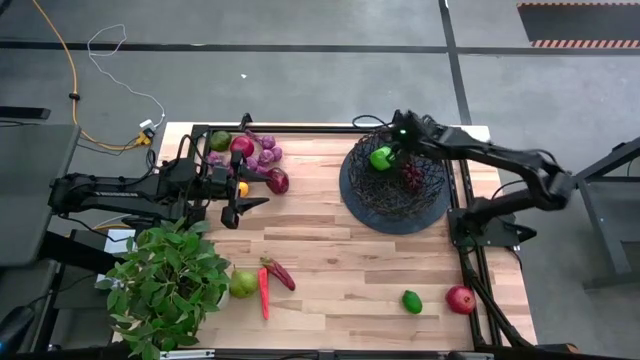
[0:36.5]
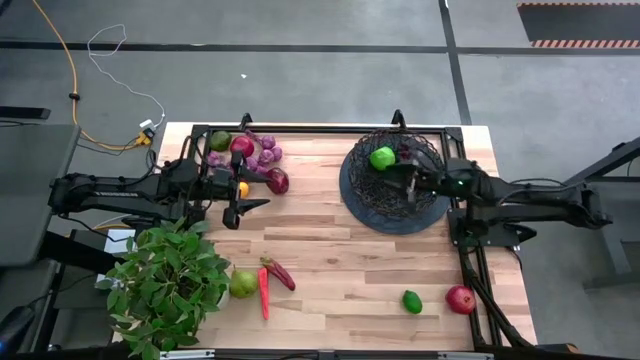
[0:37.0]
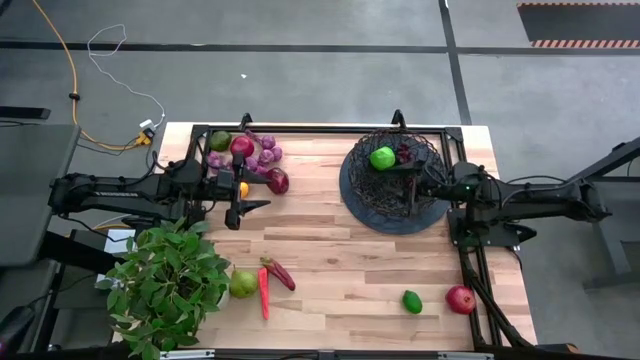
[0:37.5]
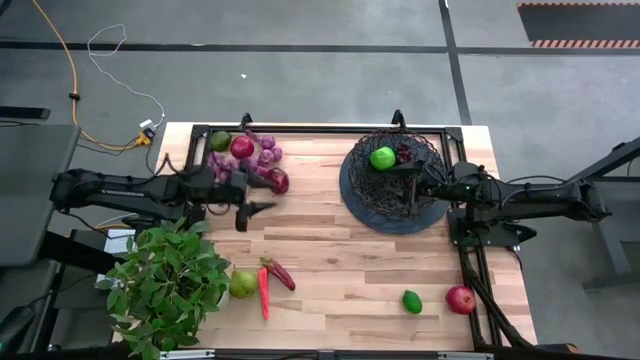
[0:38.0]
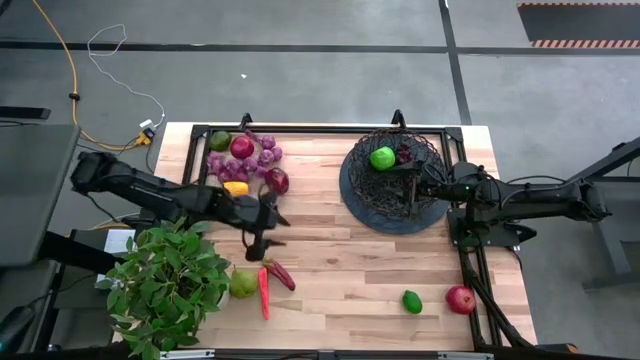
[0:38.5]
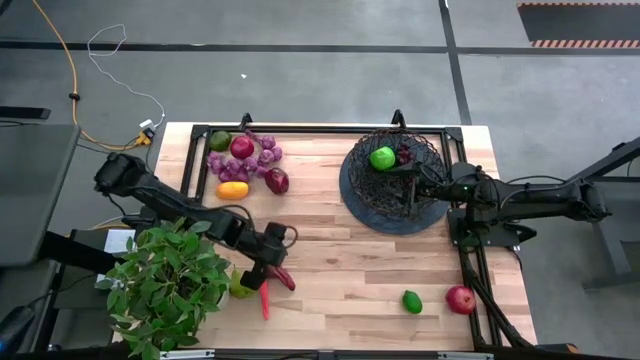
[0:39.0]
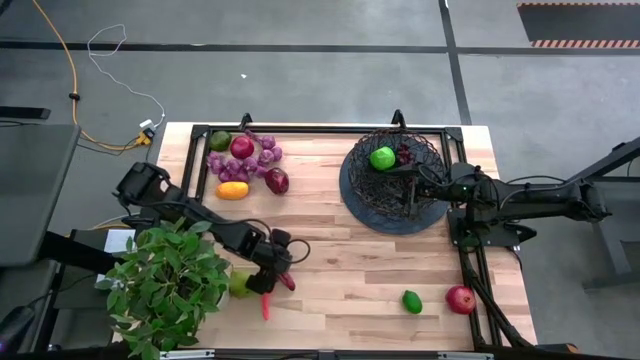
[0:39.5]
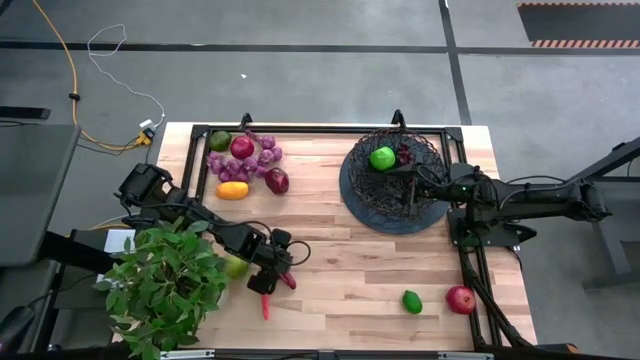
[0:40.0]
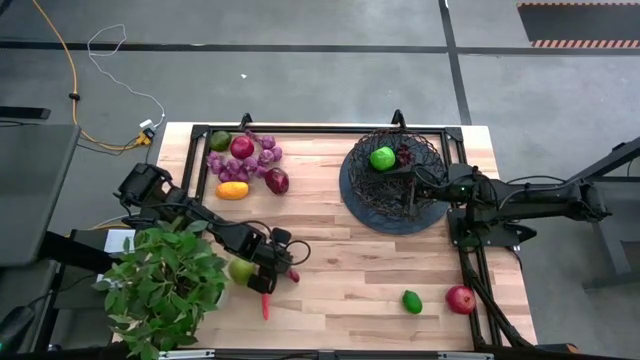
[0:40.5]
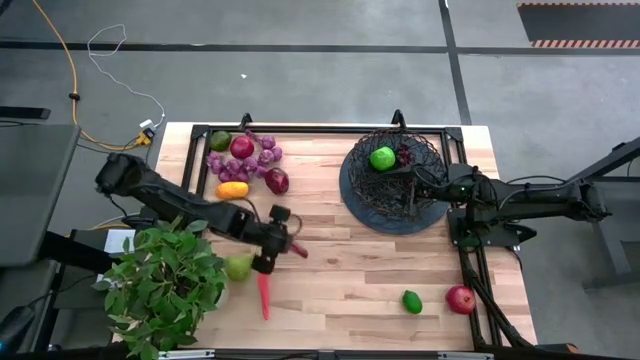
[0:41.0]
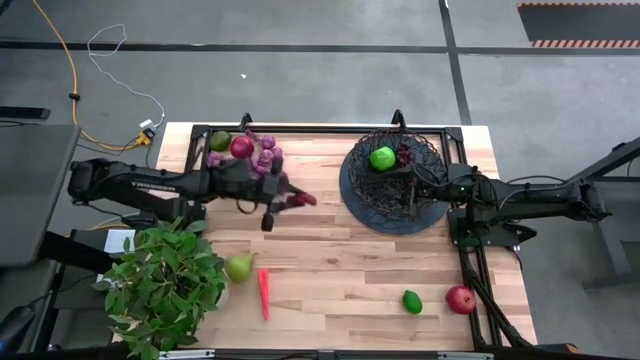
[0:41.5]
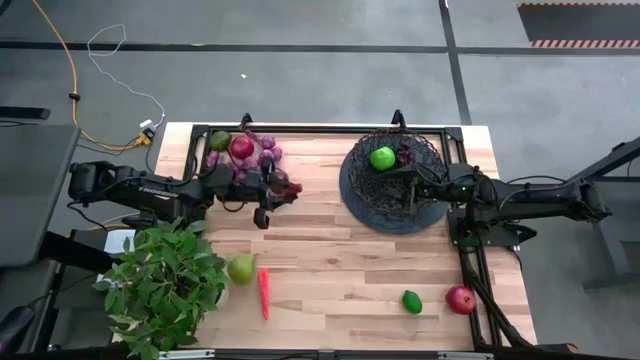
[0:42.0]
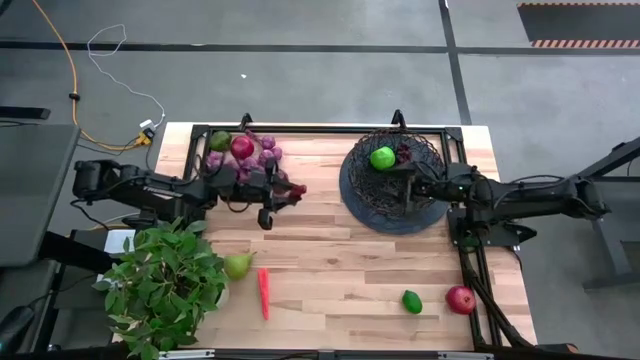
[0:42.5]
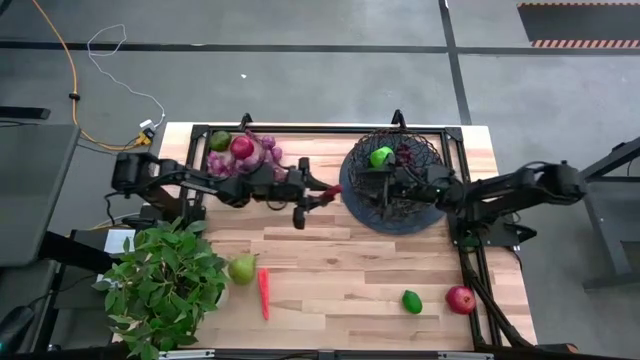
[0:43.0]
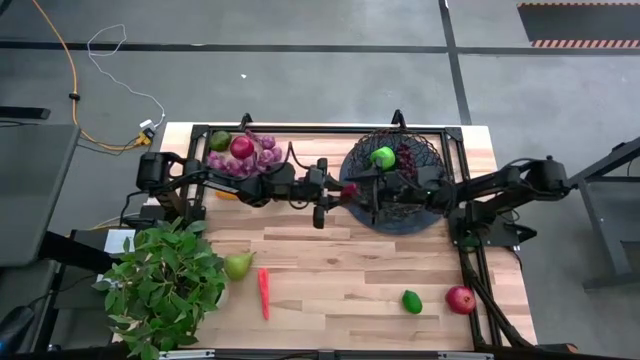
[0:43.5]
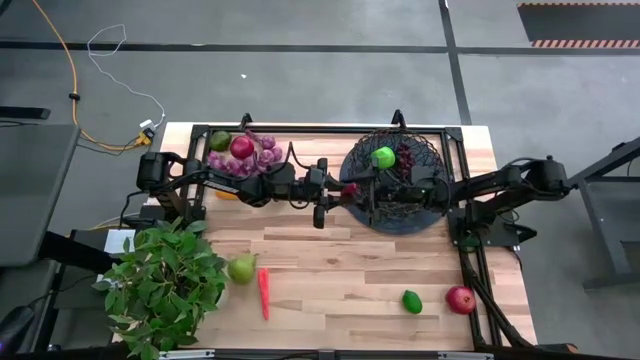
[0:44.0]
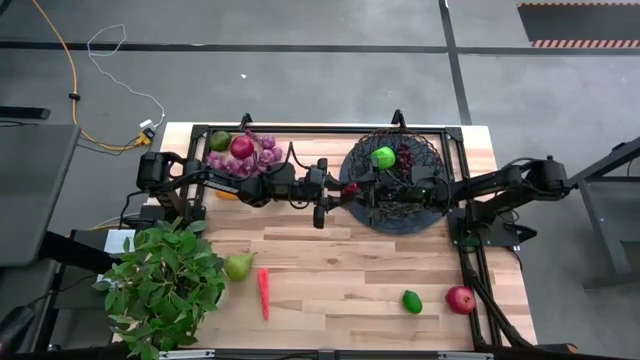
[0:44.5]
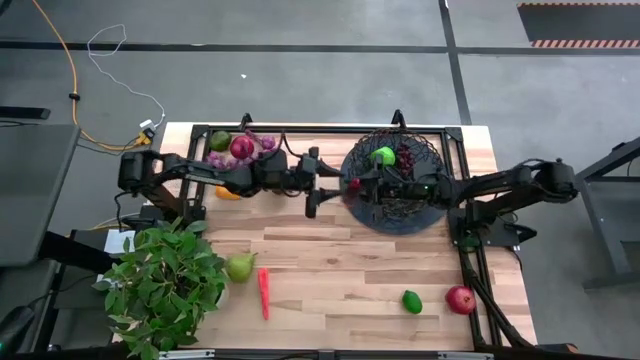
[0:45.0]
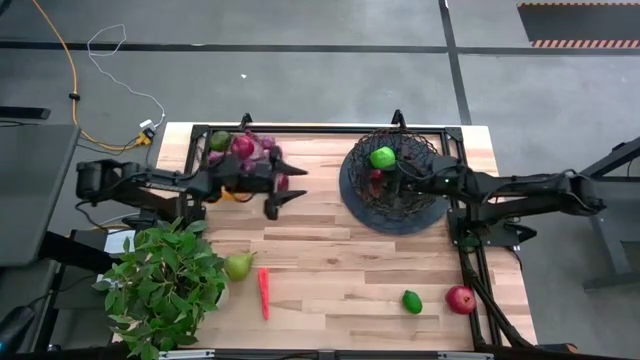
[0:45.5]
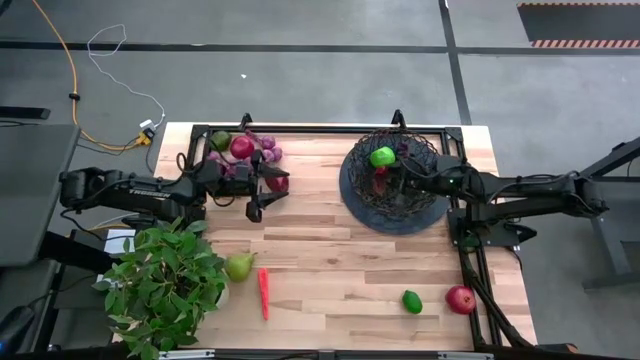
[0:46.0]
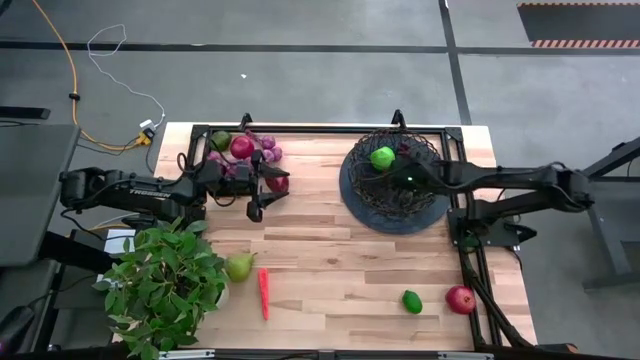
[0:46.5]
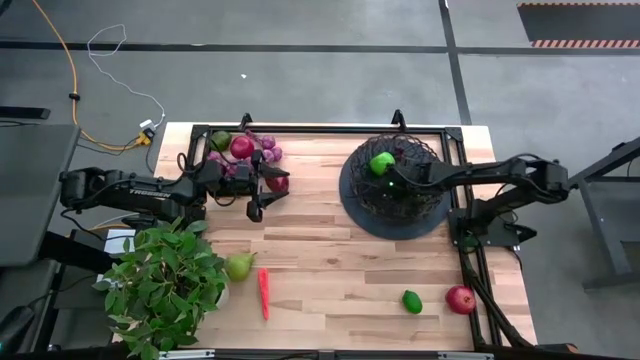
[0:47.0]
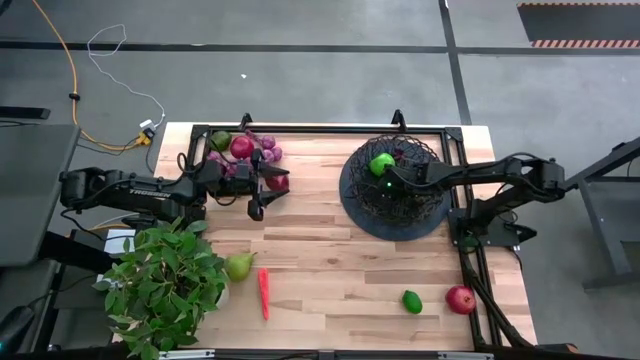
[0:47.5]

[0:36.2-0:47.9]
Task: Build produce basket
Put the red chili pepper into the black wire basket

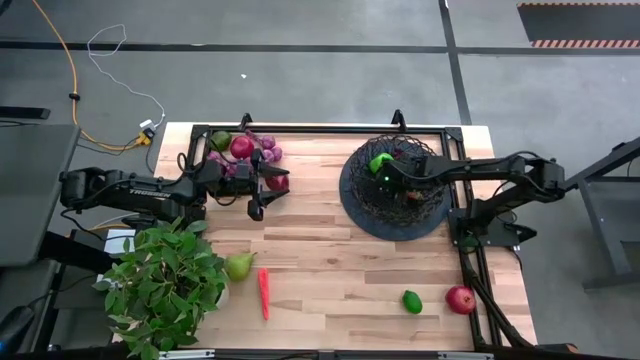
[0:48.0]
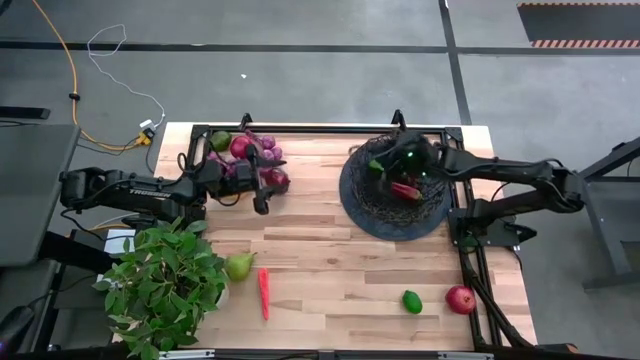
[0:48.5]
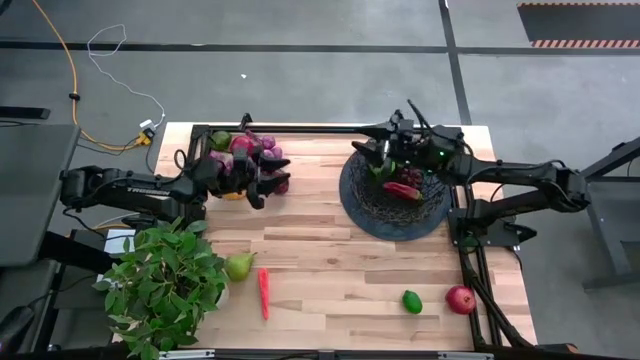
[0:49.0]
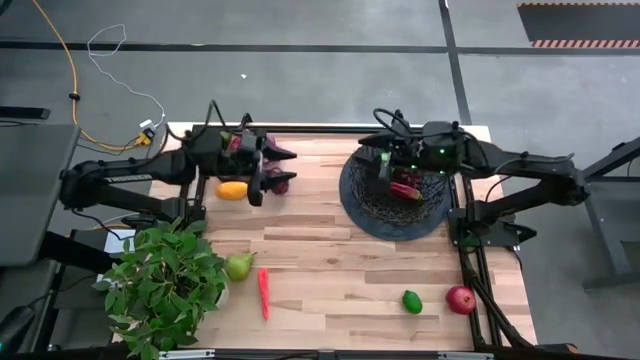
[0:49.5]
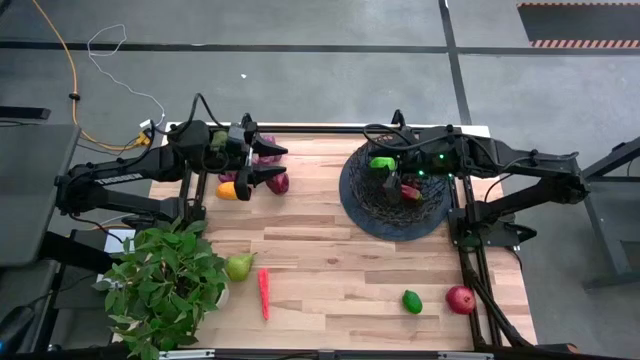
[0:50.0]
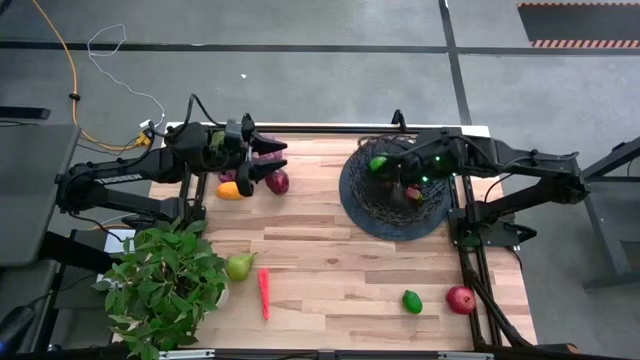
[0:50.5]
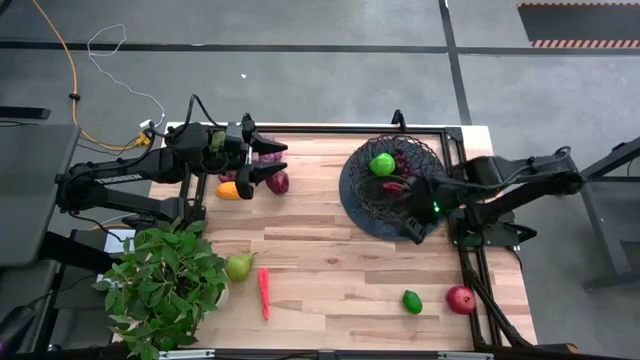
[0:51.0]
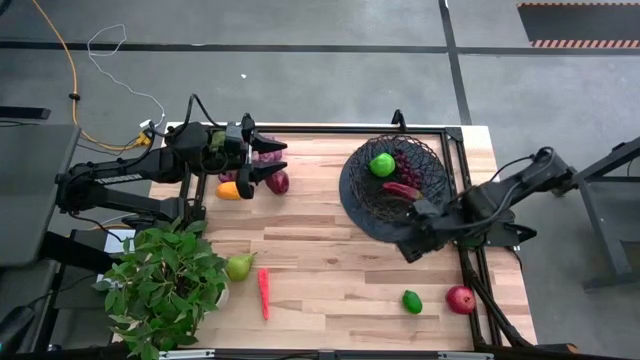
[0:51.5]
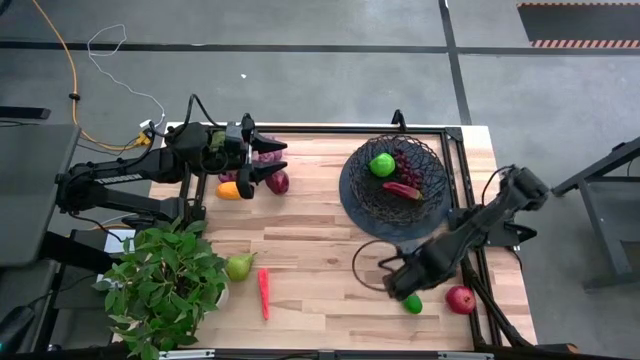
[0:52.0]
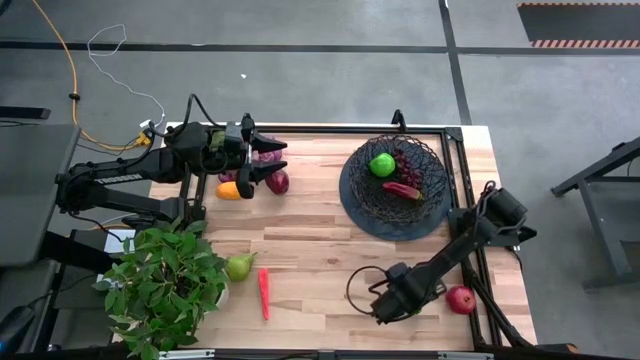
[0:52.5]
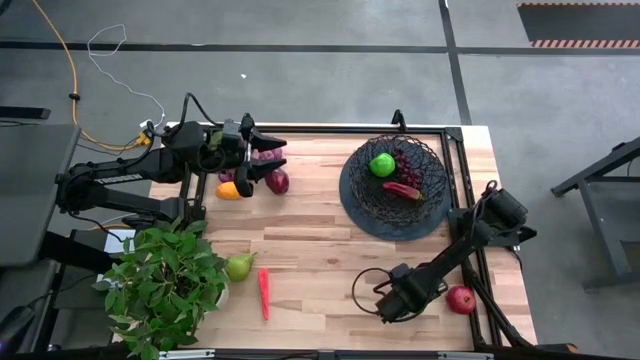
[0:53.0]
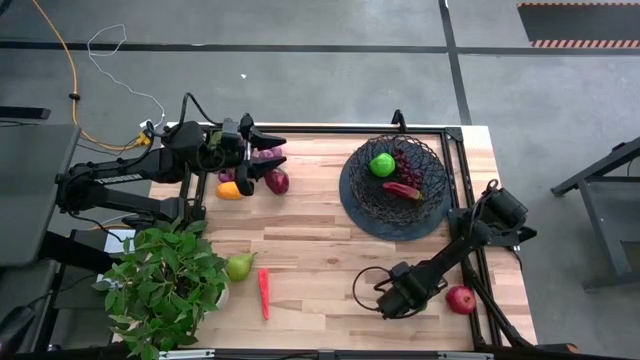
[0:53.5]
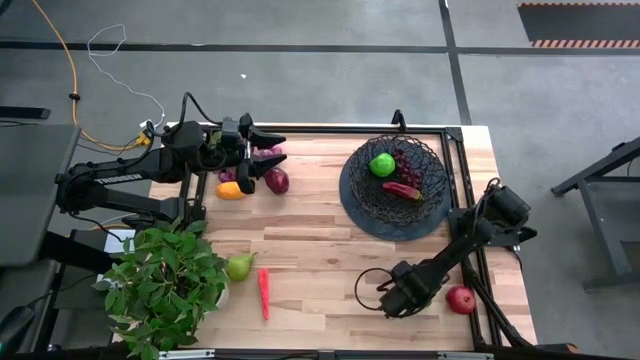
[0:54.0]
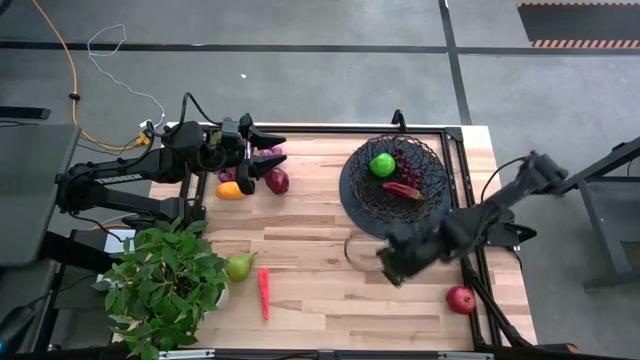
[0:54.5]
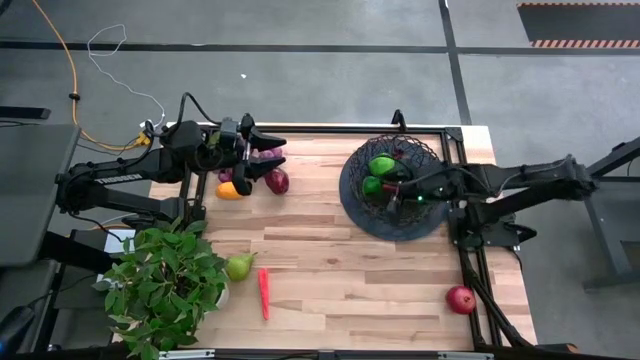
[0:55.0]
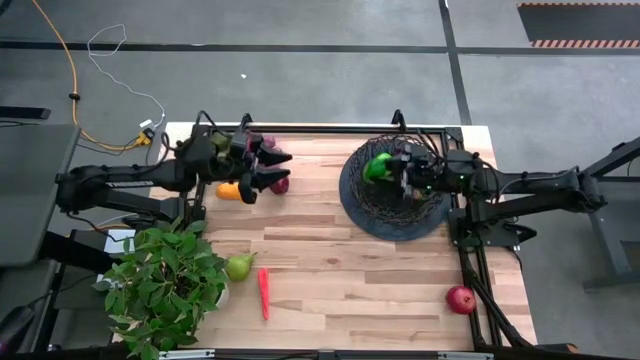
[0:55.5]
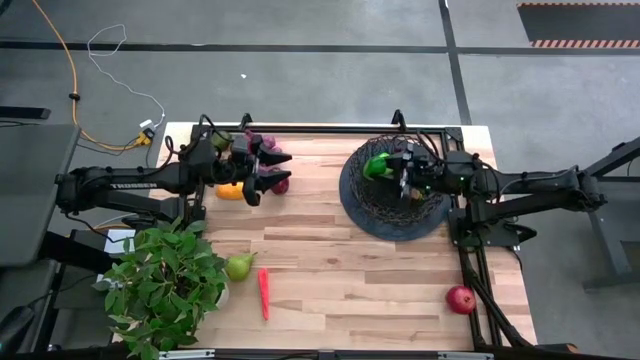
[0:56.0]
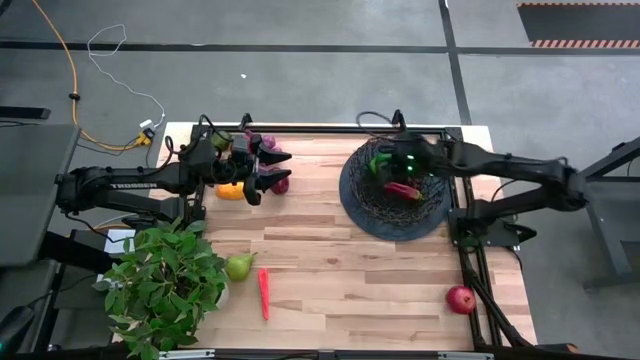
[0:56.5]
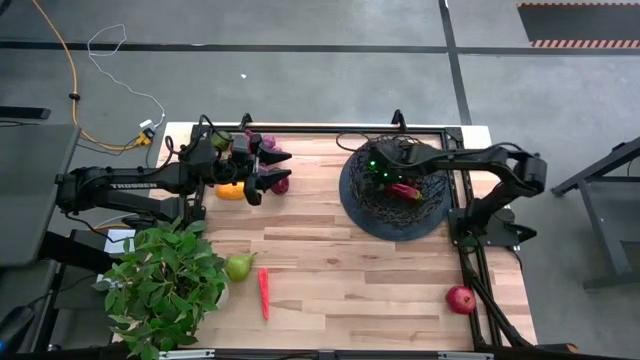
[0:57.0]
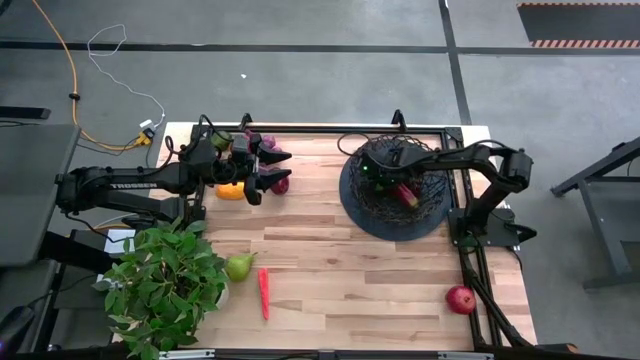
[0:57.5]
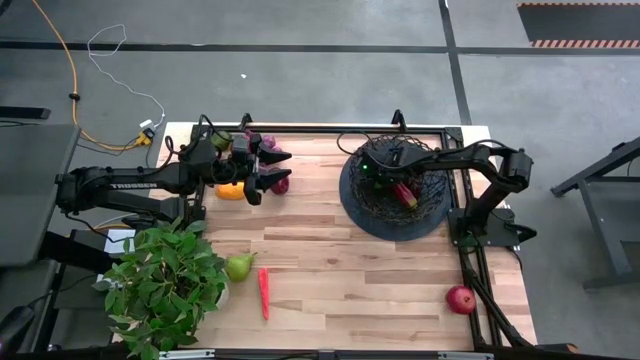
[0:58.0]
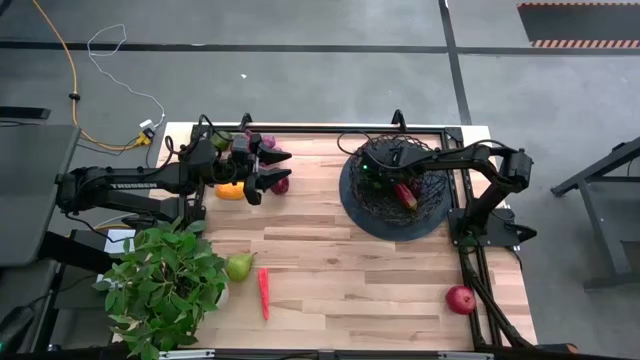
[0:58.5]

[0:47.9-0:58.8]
Put the bottom green lime into the black wire basket

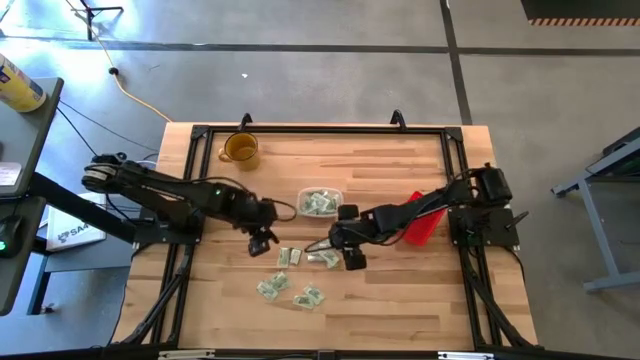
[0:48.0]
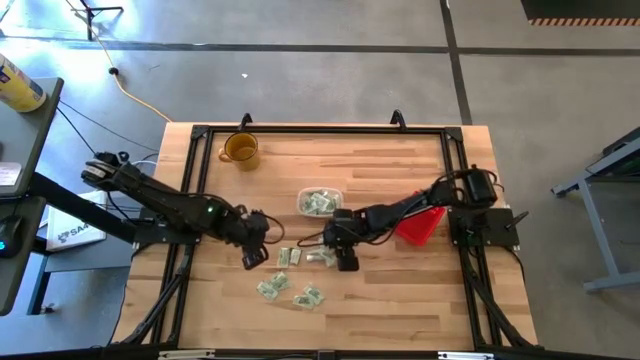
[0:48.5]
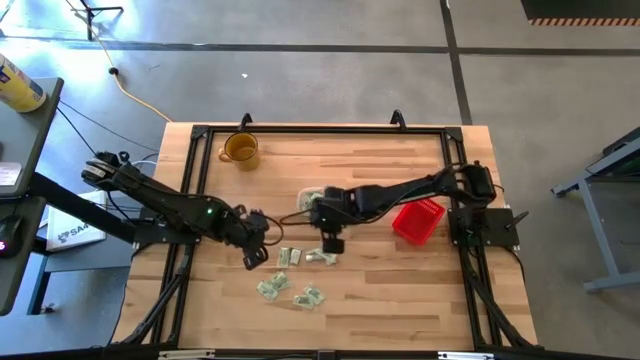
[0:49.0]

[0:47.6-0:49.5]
Task: Pick and place items into bin
Put the white stevia packet into the transparent bin
